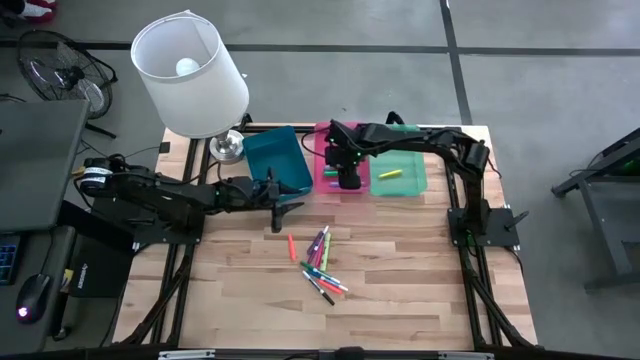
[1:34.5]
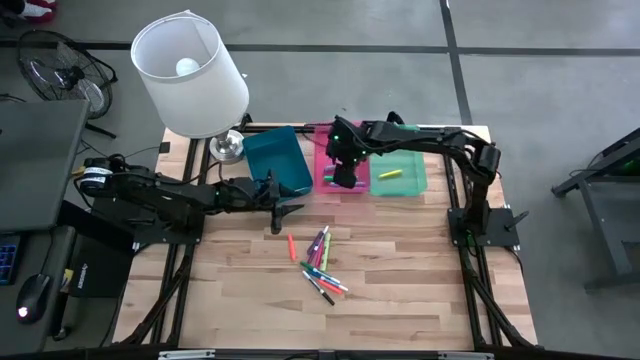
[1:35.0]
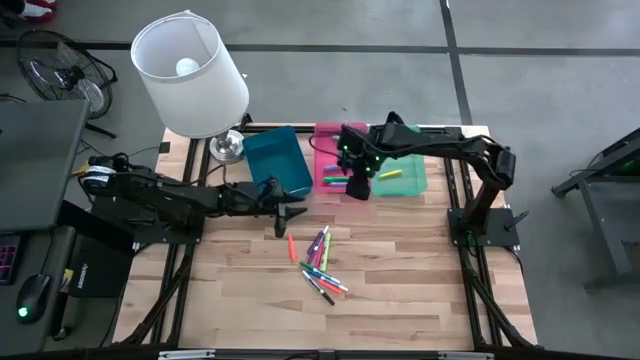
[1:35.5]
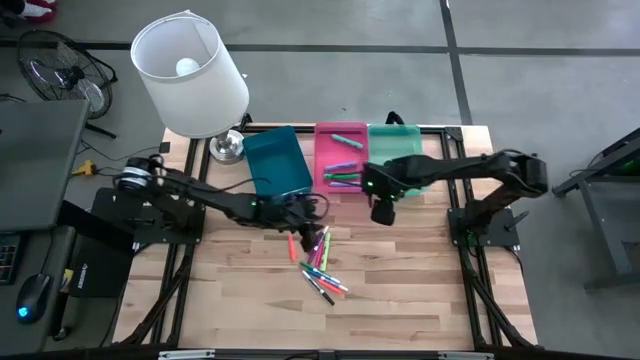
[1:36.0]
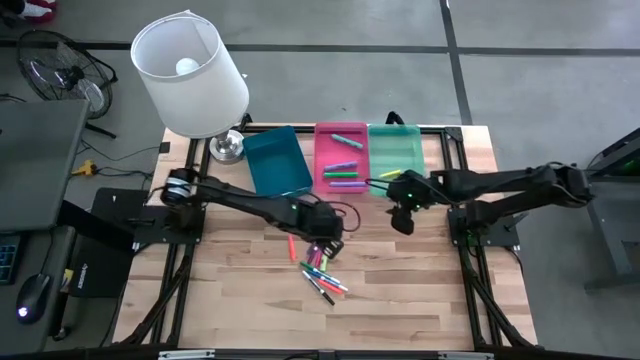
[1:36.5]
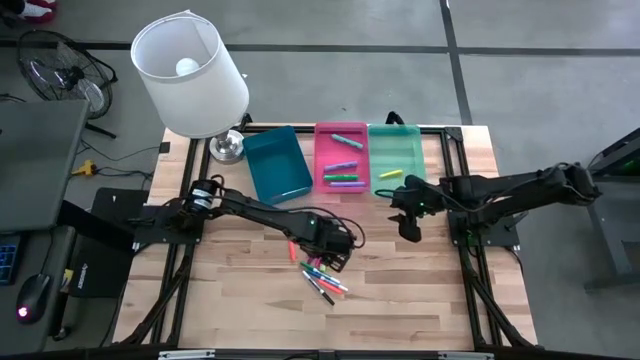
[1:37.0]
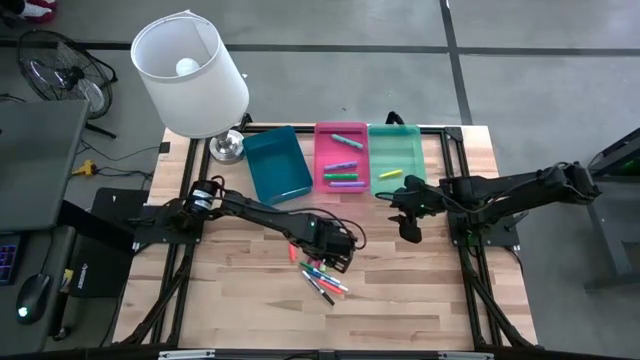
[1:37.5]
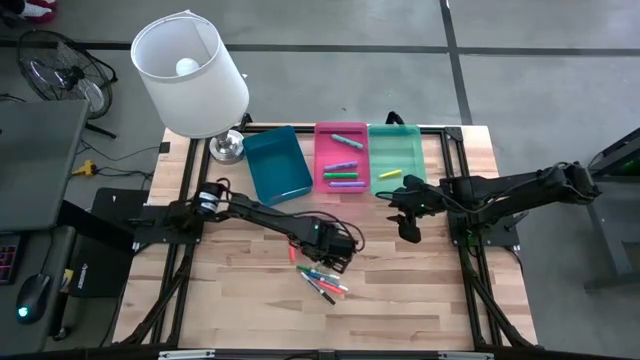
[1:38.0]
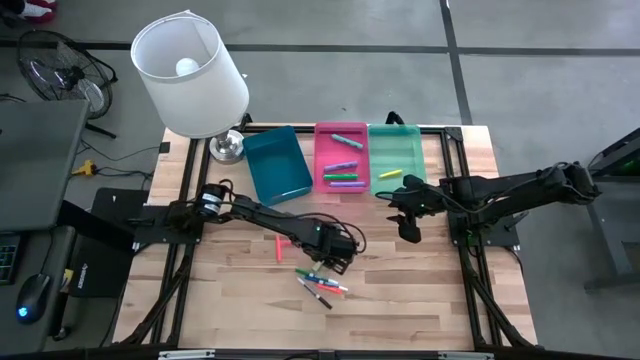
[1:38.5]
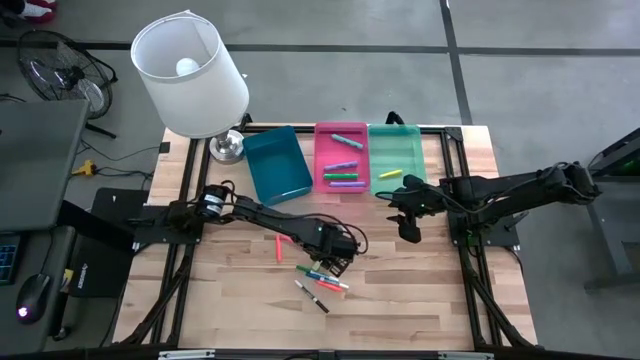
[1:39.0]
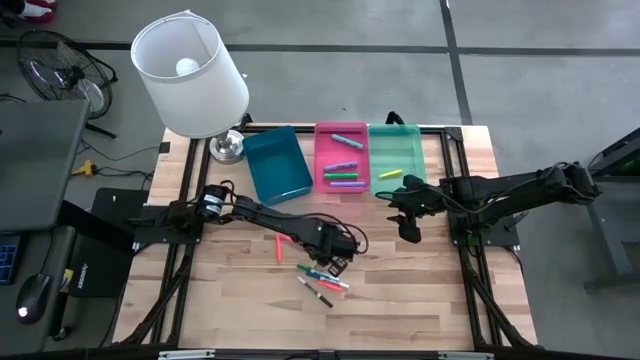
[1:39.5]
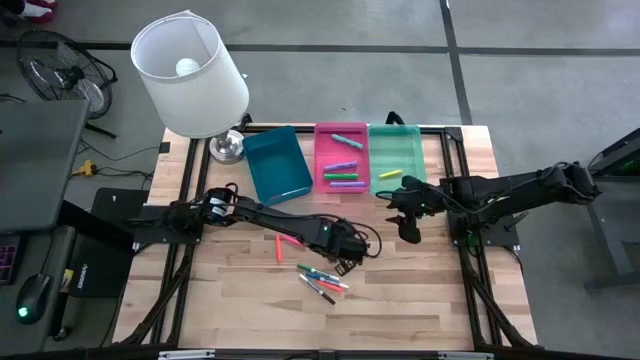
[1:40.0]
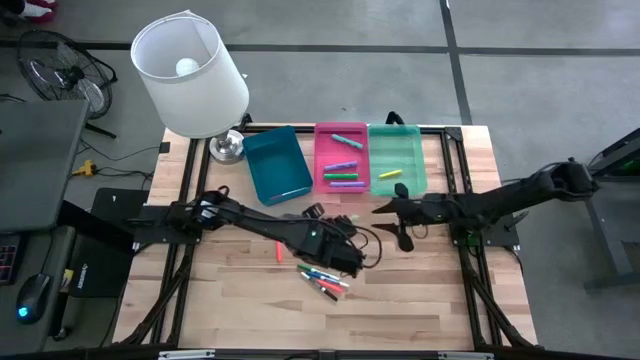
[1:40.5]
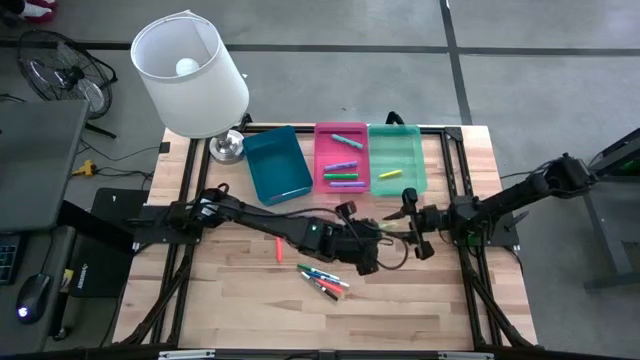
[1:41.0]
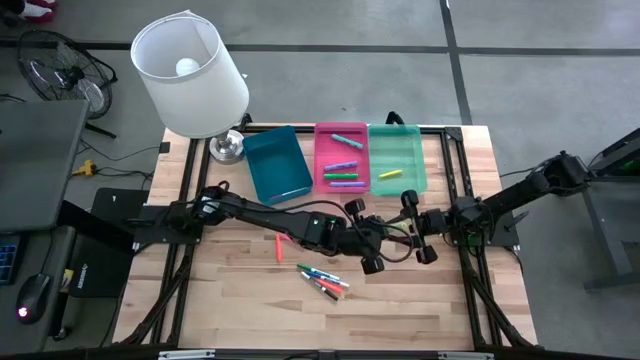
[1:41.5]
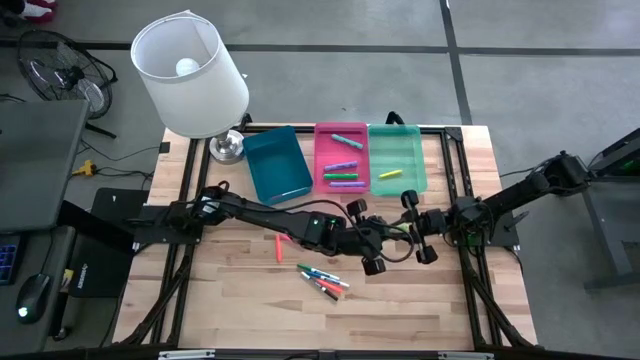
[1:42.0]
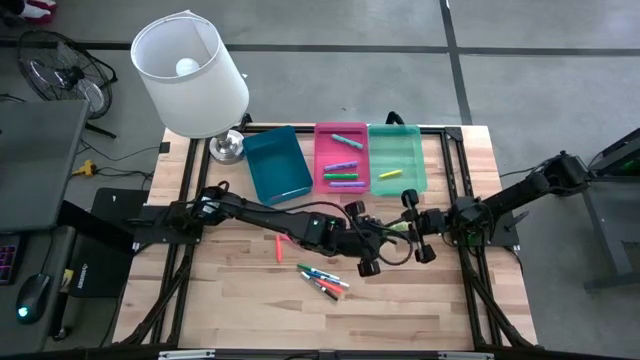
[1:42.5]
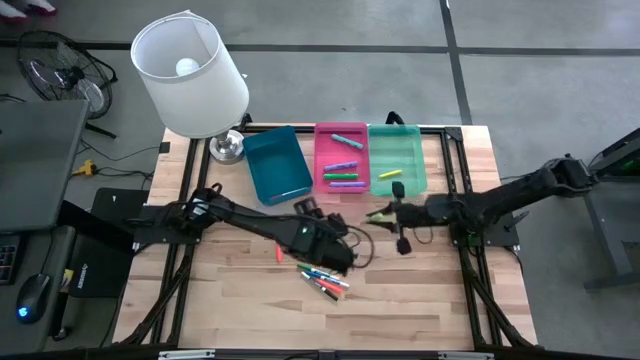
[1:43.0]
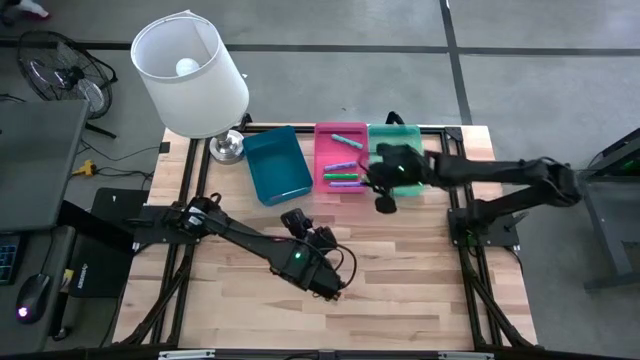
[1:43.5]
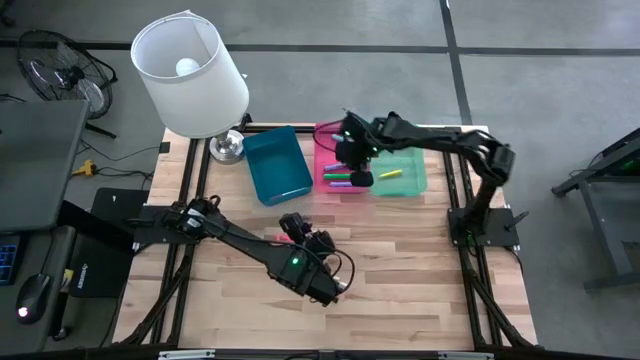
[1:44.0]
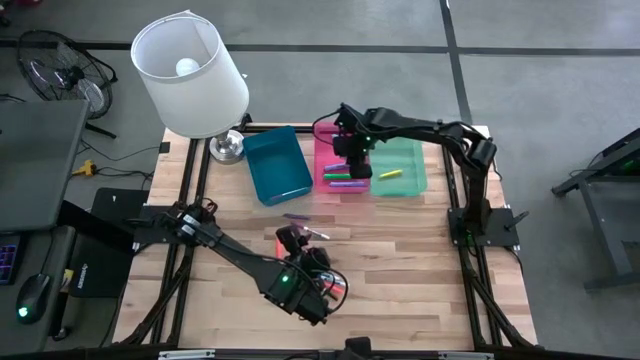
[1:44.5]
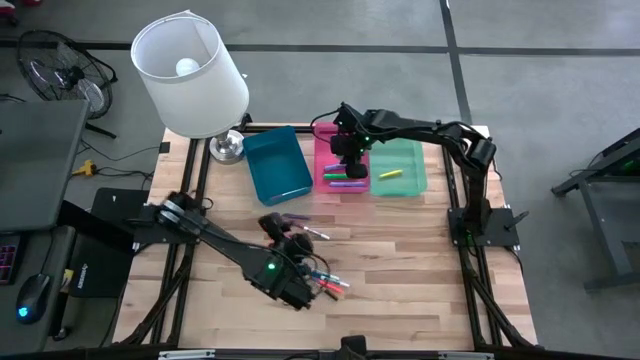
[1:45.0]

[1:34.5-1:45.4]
Task: Pick & Place Markers
Put the light green highlighter into the pink bin

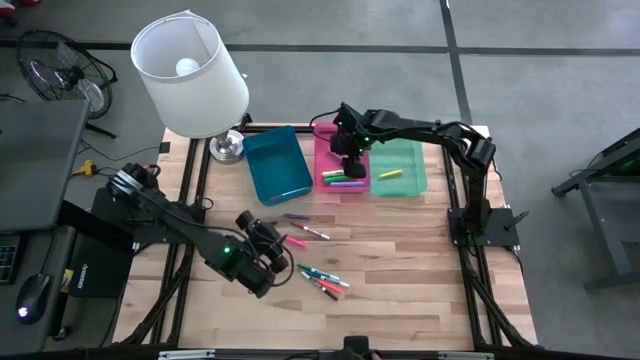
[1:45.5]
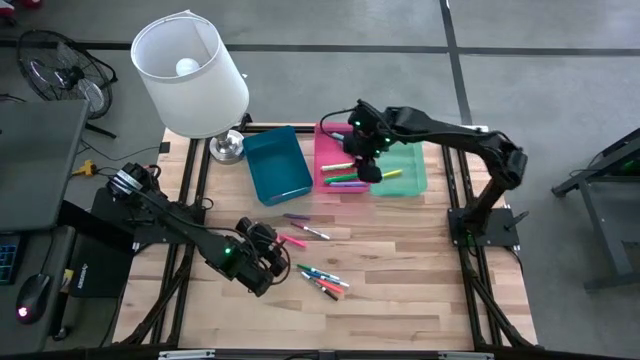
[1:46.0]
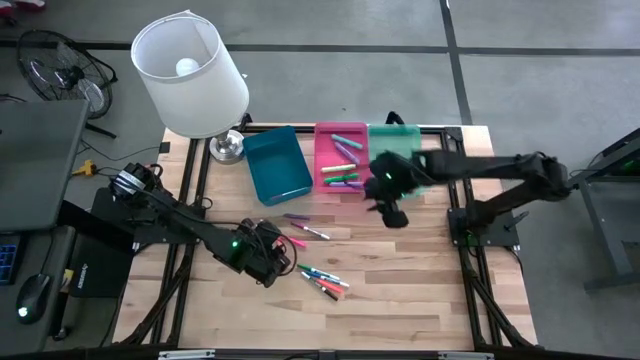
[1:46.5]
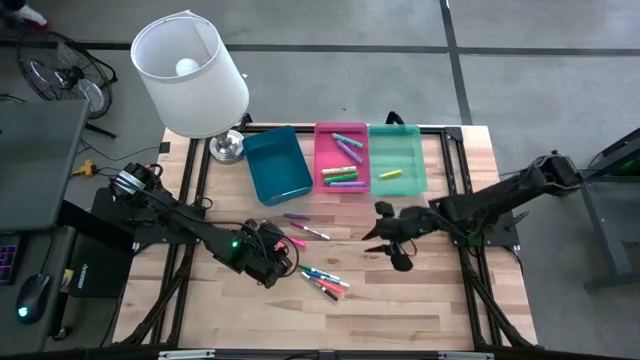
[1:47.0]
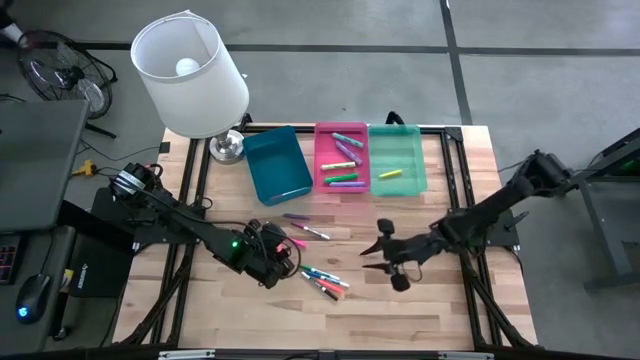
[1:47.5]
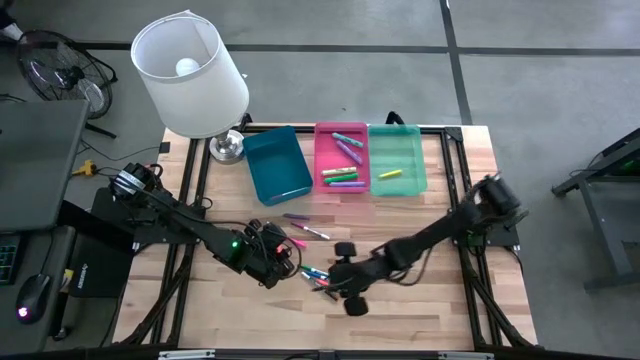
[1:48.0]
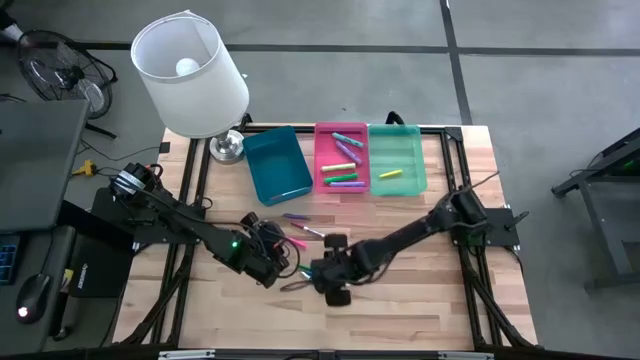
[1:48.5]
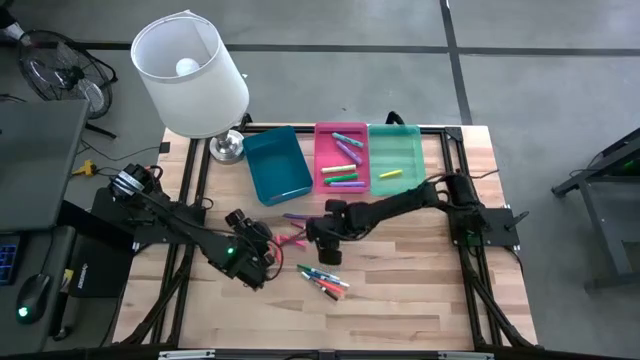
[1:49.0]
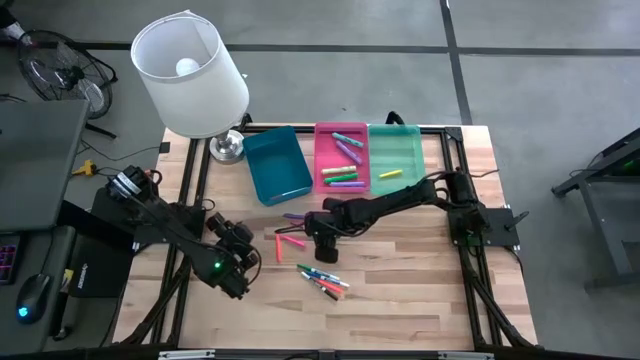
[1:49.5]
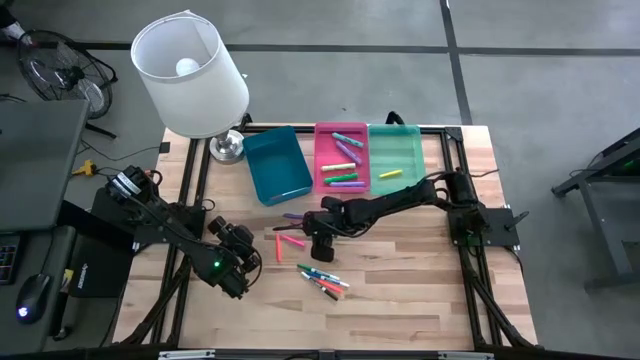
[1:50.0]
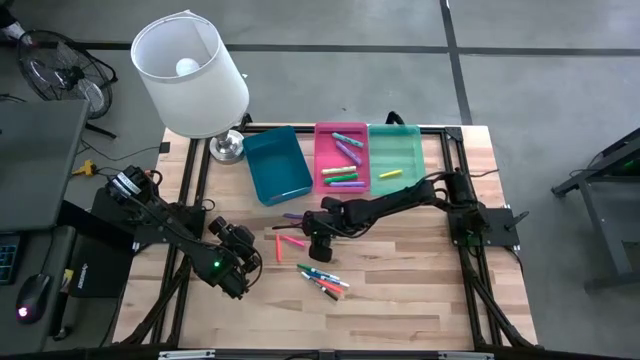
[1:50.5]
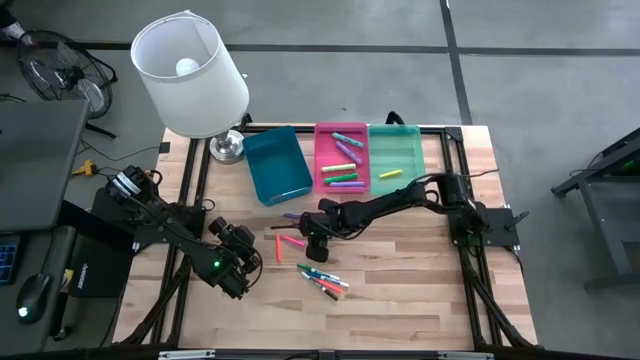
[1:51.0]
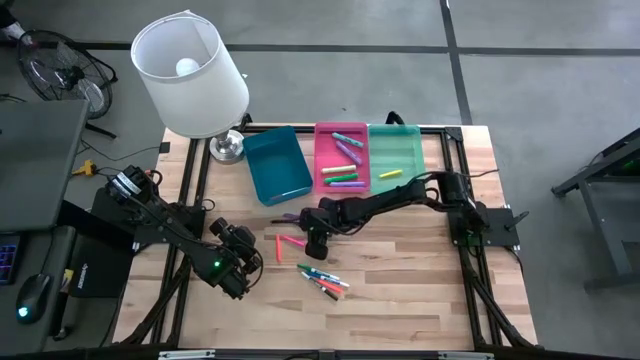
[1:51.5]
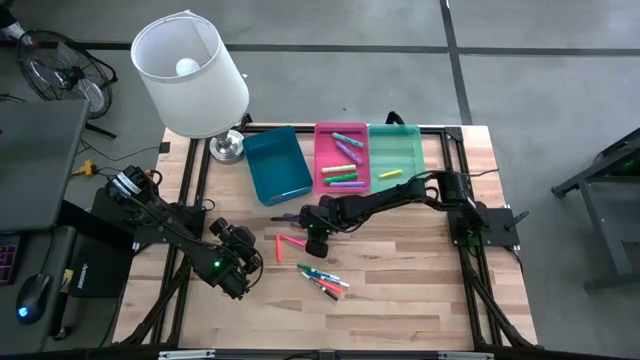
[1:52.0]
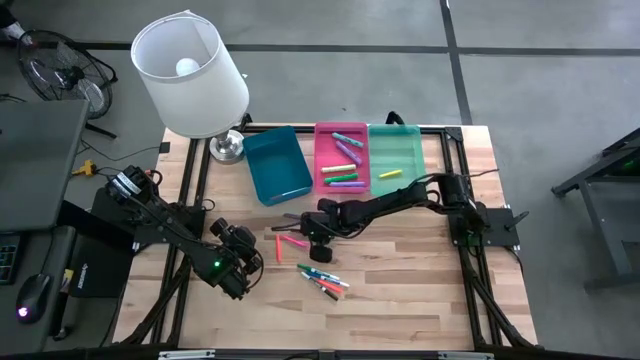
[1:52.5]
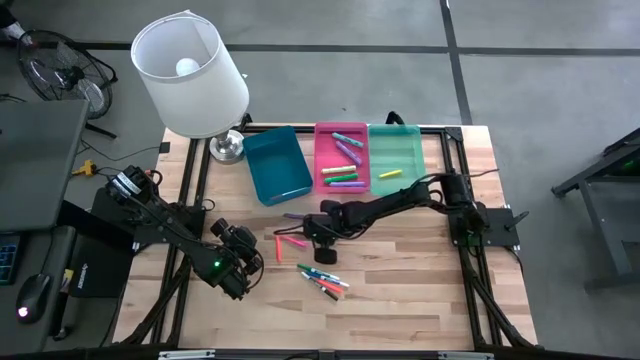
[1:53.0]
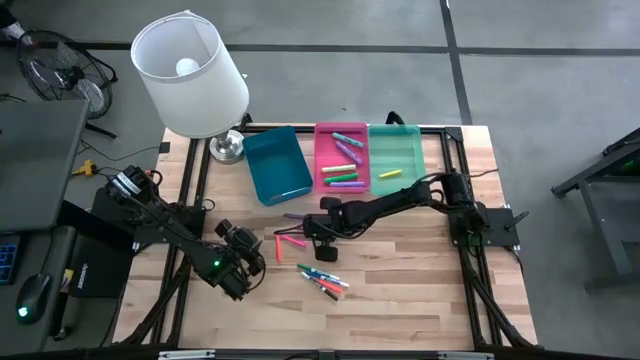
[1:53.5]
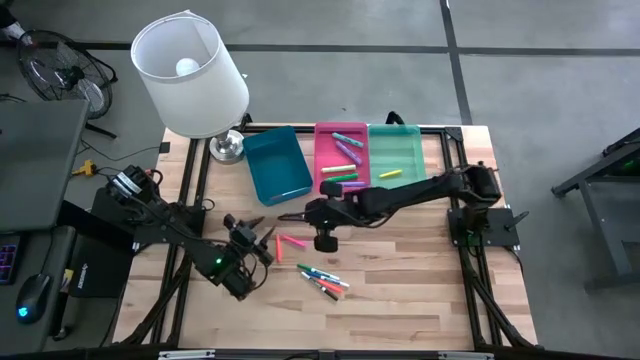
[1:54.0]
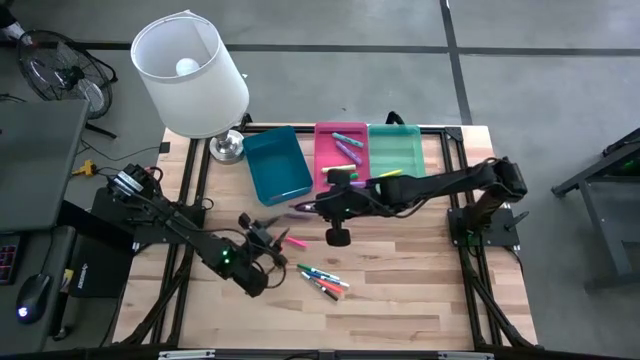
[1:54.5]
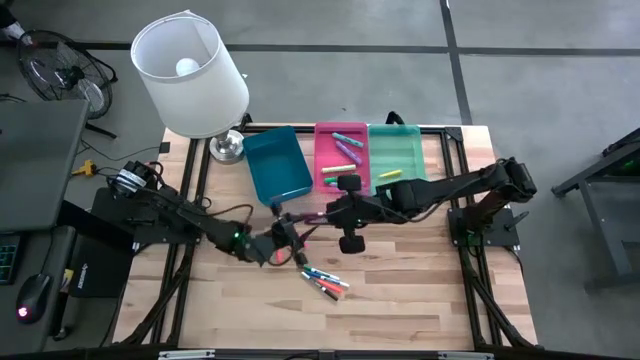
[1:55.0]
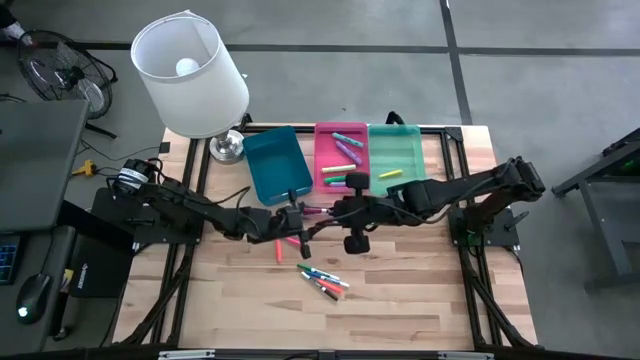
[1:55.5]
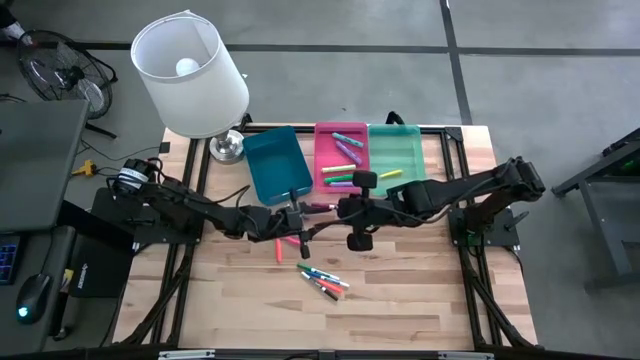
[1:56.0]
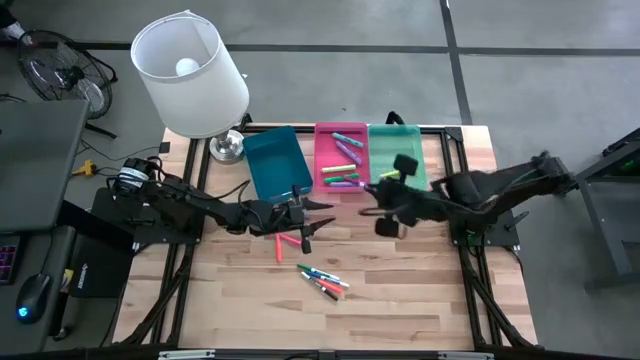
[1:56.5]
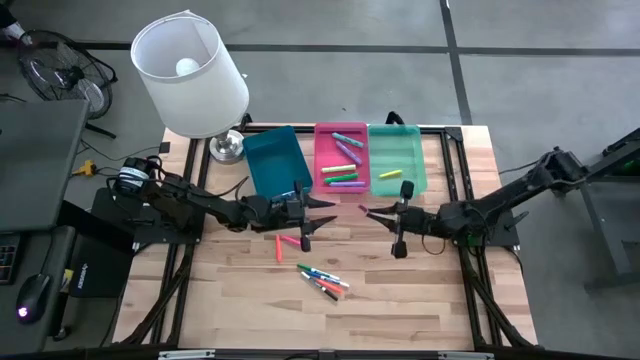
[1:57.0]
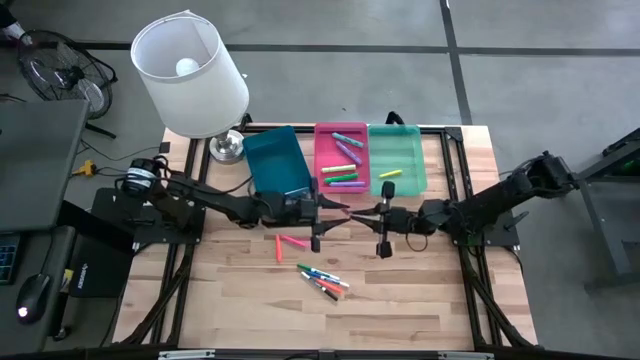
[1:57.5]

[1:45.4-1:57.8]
Put the dark pink dry erase marker into the dark blue bin
